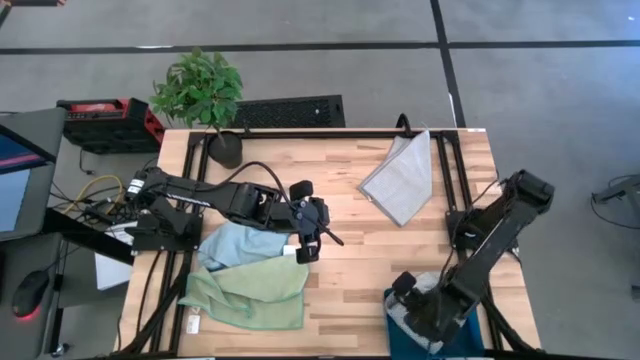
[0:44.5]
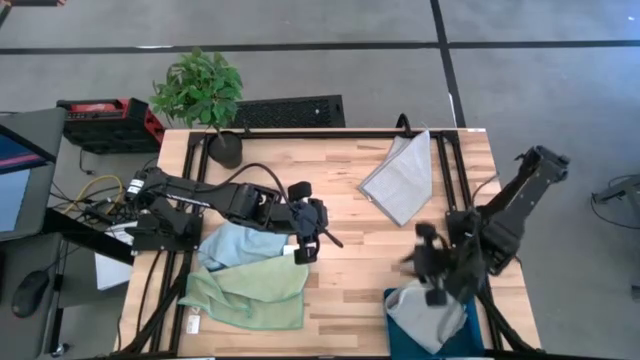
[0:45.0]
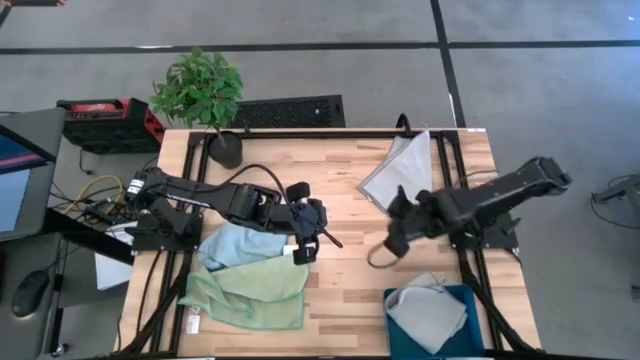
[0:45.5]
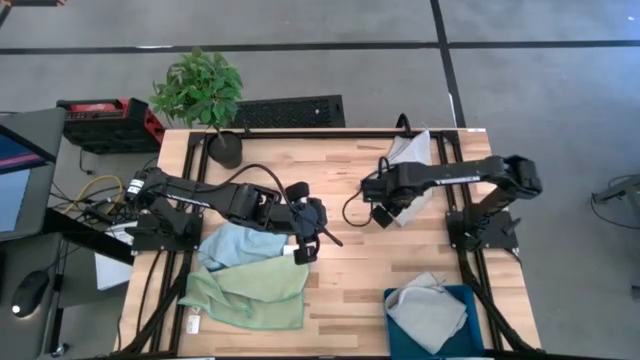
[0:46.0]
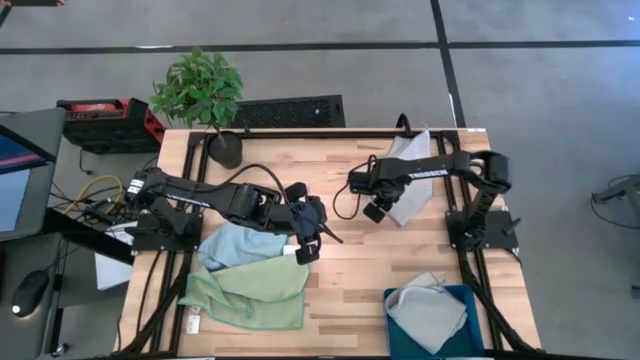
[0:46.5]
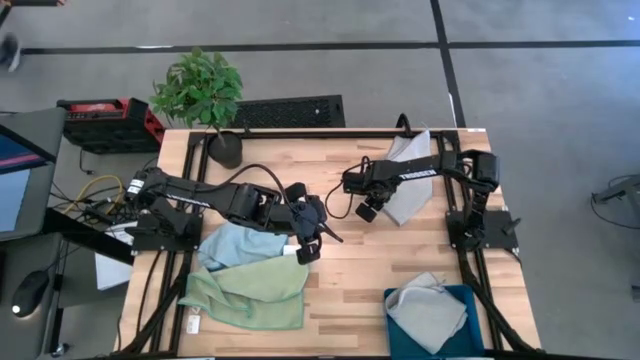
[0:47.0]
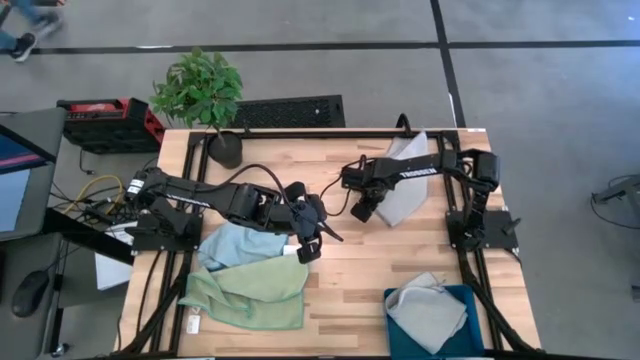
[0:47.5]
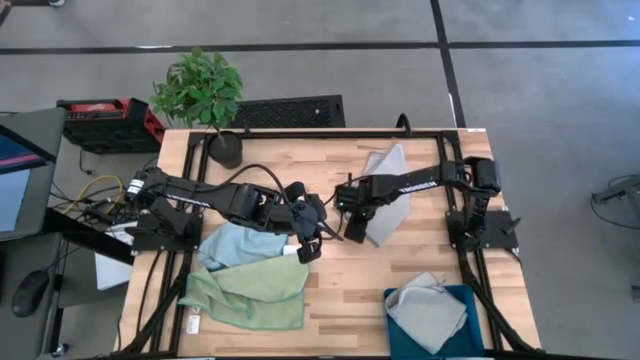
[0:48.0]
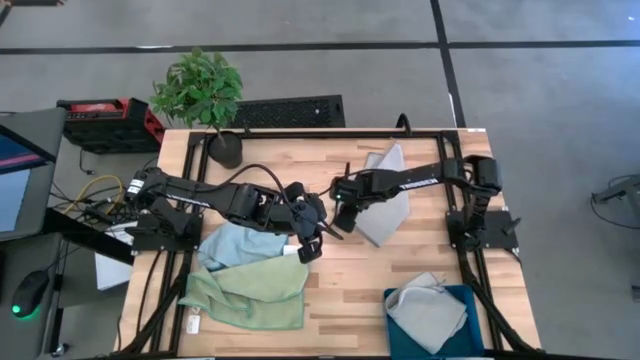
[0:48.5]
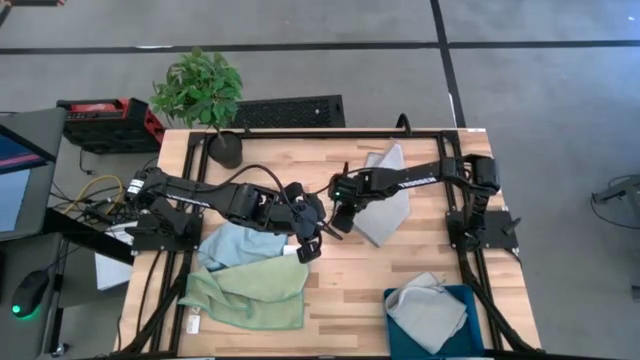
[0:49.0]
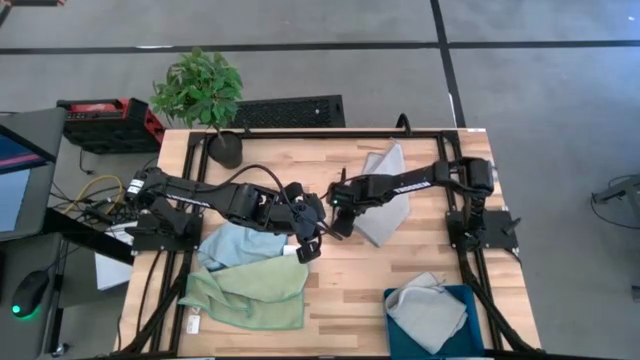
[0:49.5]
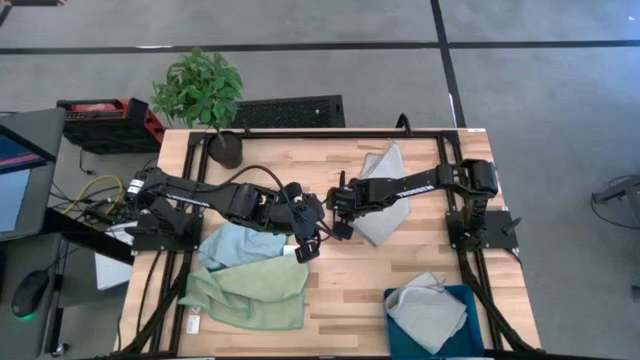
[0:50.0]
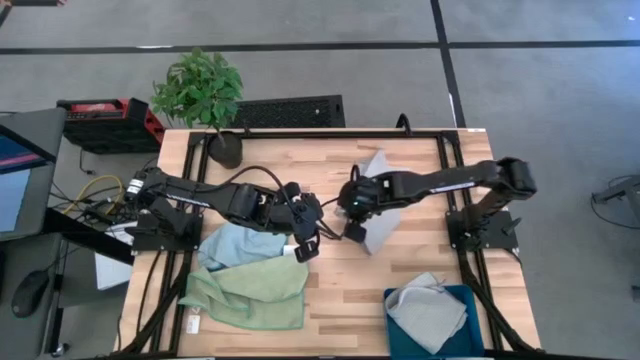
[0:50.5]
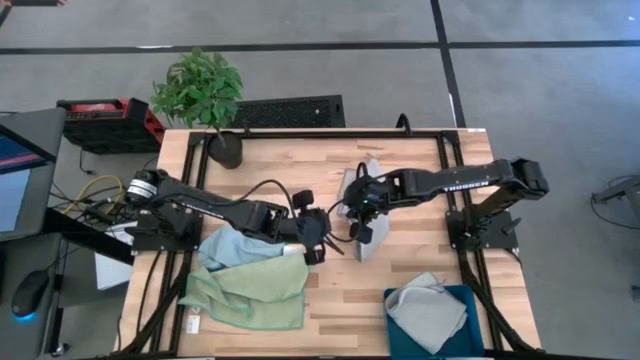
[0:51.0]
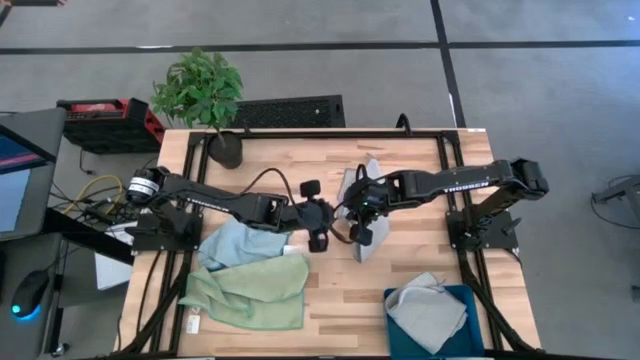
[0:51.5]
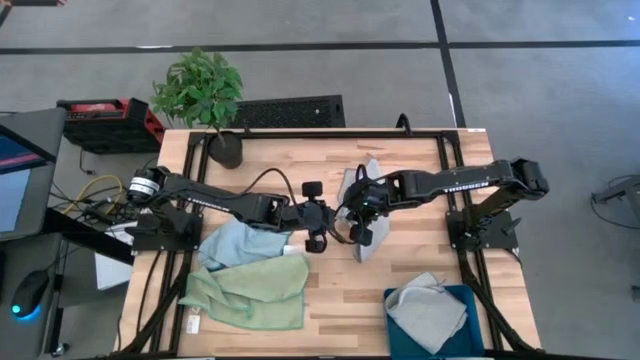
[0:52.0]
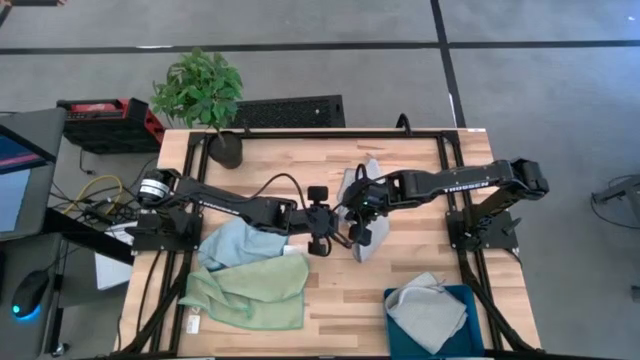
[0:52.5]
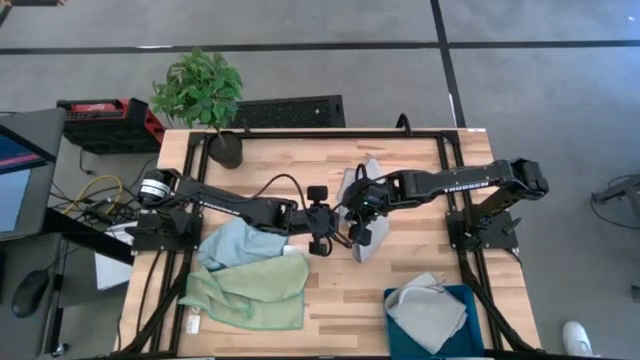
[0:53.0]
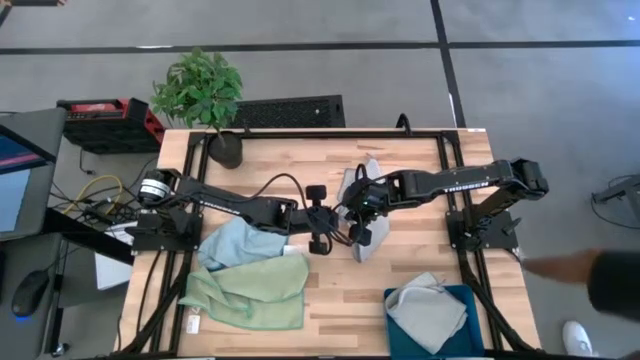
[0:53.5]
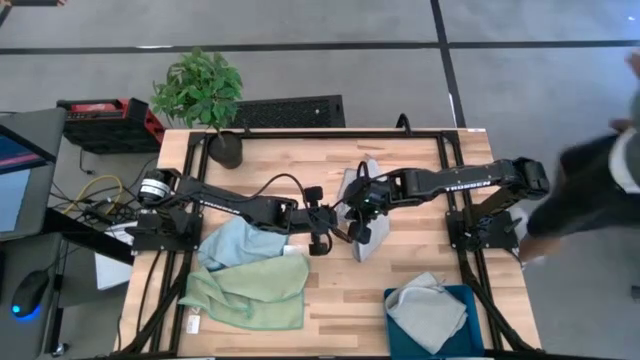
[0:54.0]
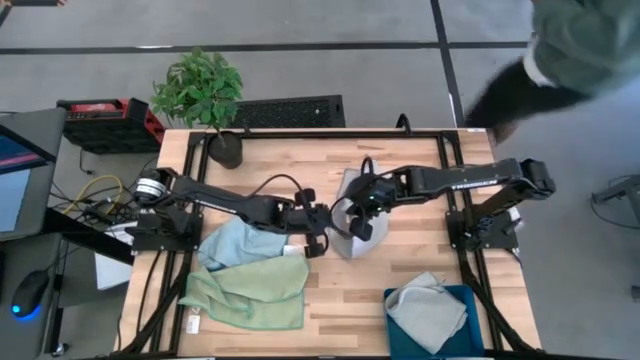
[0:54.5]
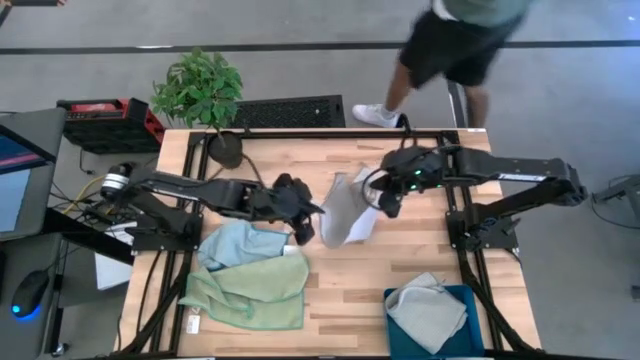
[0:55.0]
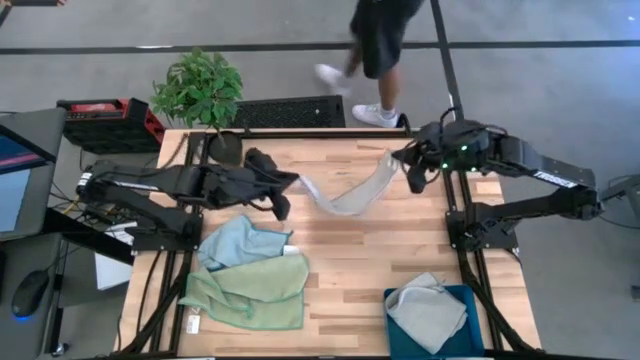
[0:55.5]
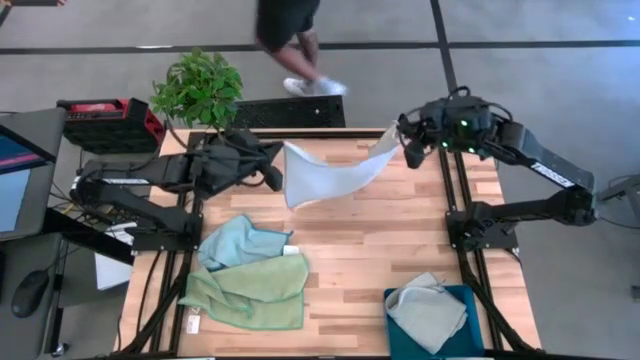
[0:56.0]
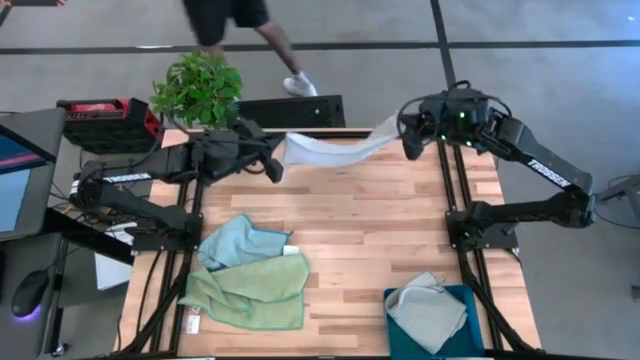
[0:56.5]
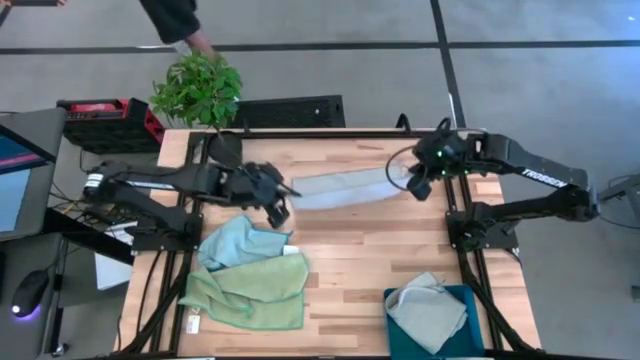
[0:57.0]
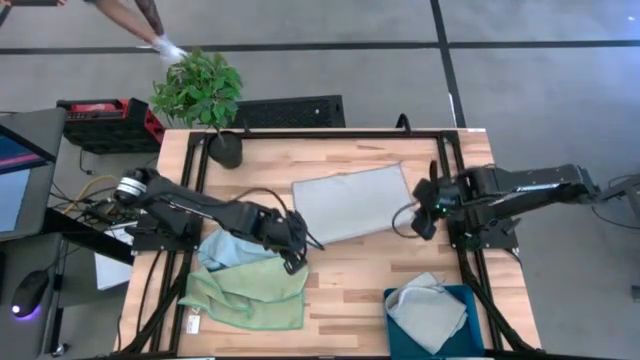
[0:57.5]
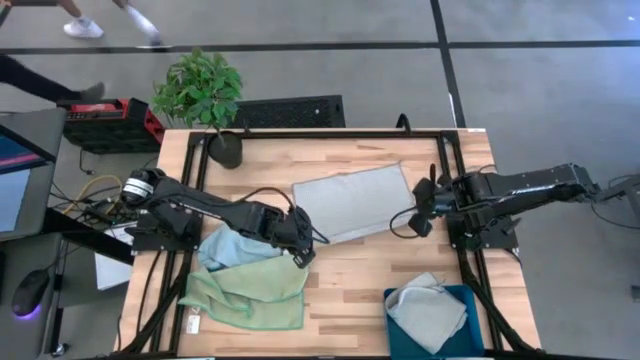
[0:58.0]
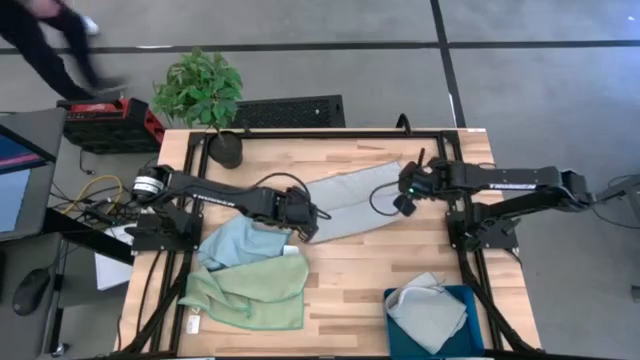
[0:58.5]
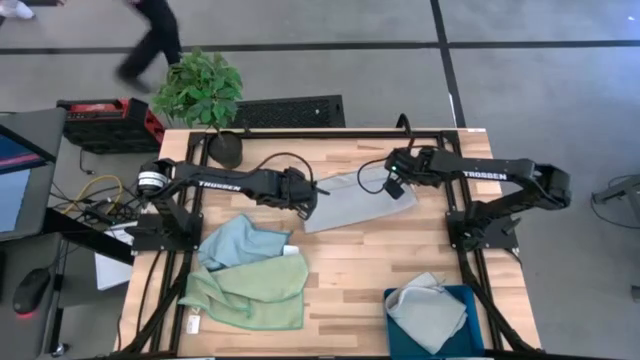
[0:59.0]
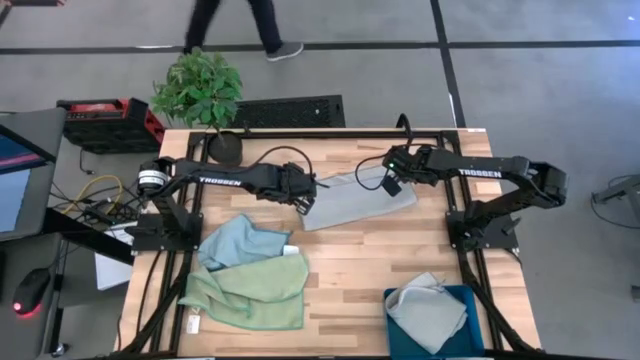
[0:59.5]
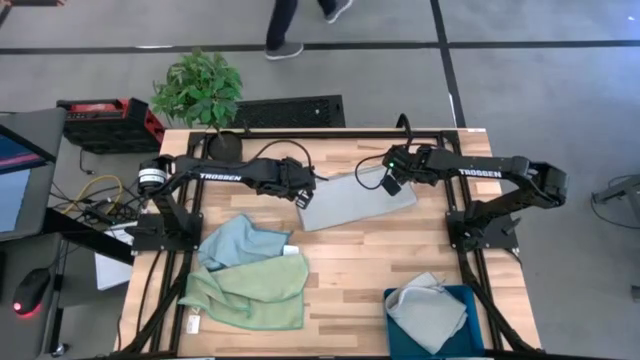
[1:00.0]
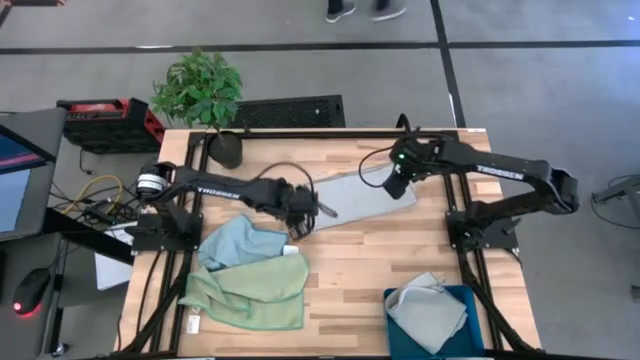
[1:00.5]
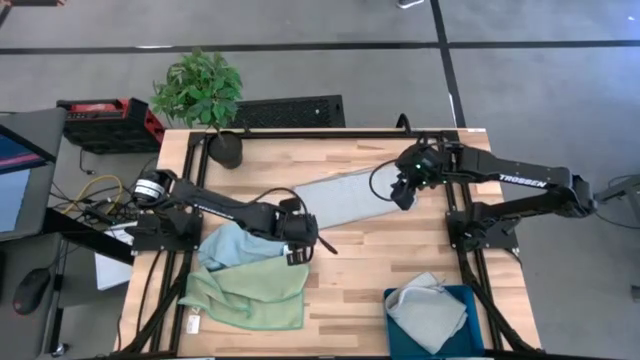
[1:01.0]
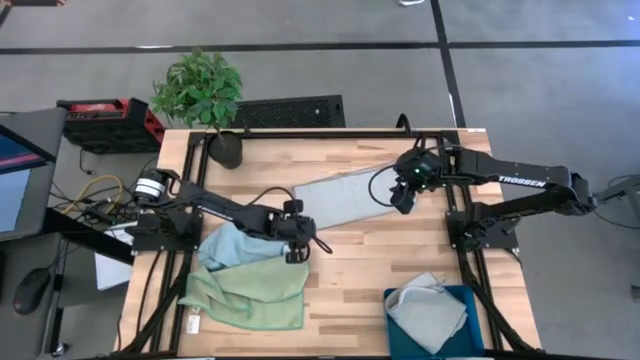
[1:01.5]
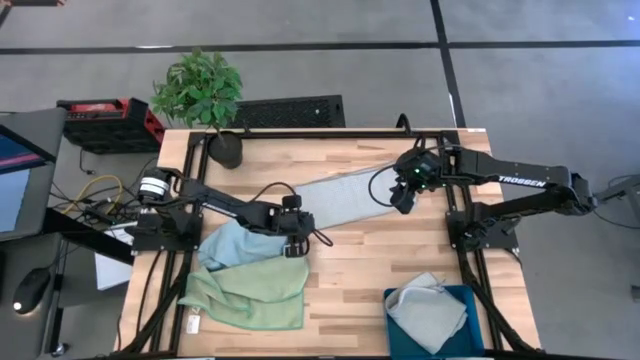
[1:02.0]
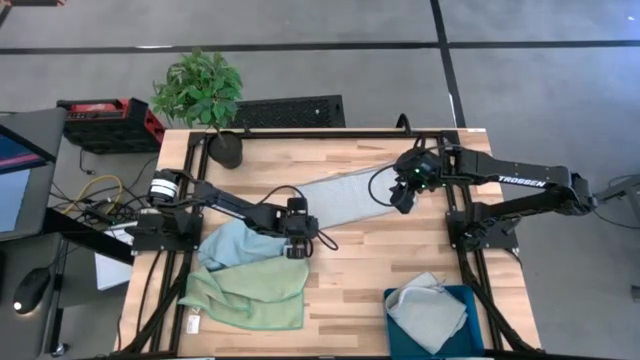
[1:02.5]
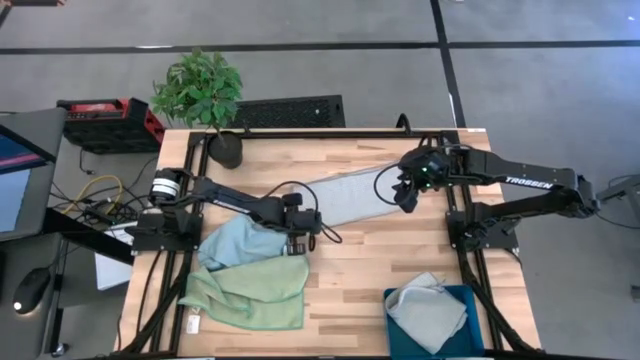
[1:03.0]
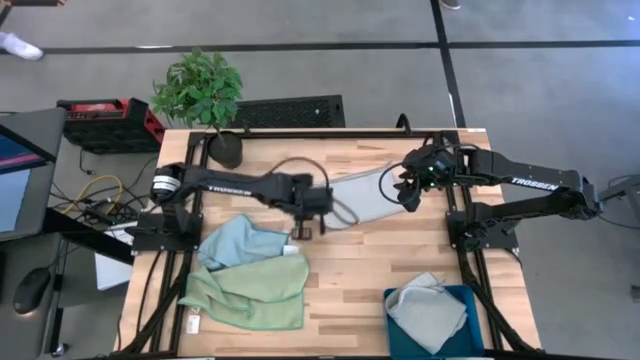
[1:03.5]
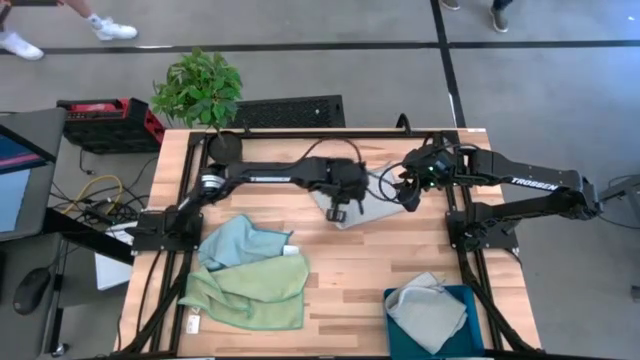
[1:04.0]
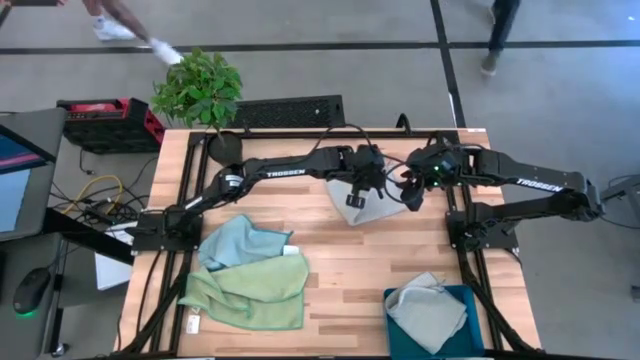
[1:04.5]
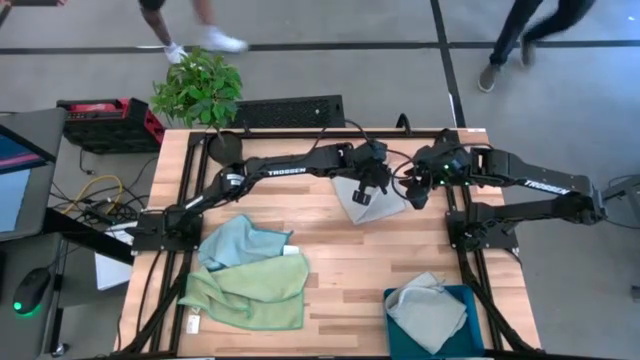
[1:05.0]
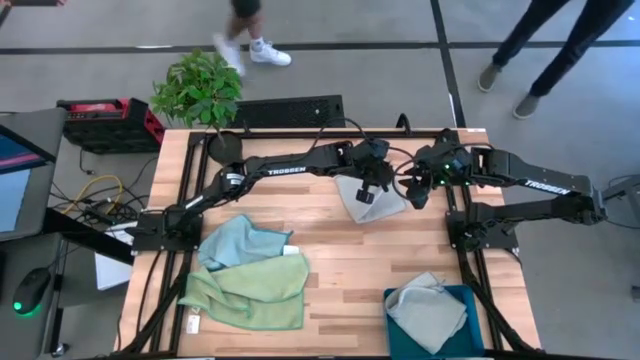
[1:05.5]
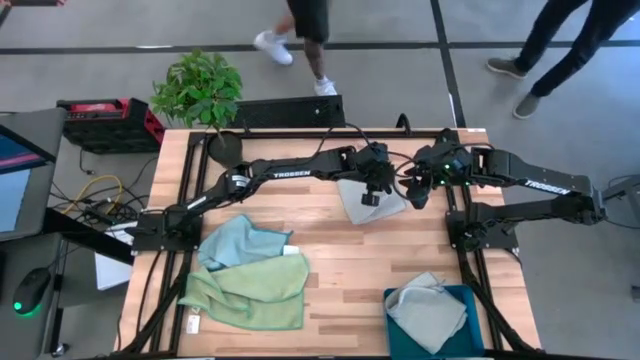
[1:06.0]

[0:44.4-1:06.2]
Task: Fold microfiber towels
Fold the gray microfiber towel
